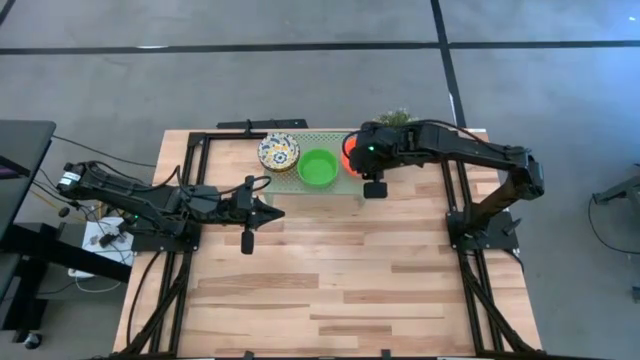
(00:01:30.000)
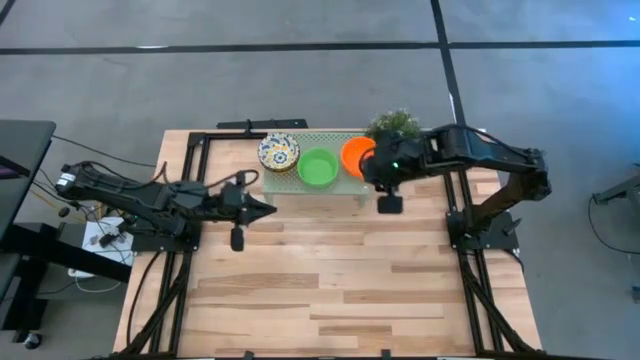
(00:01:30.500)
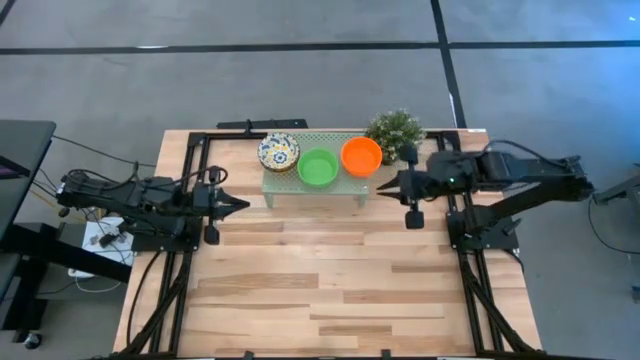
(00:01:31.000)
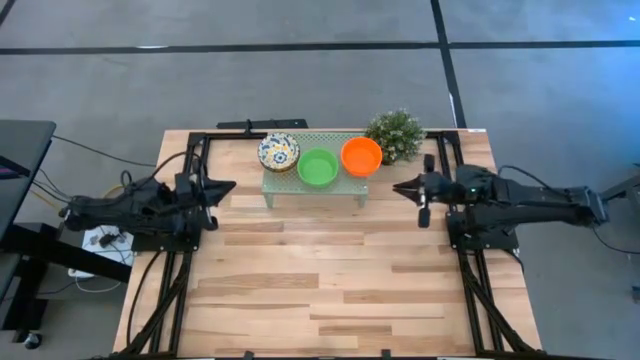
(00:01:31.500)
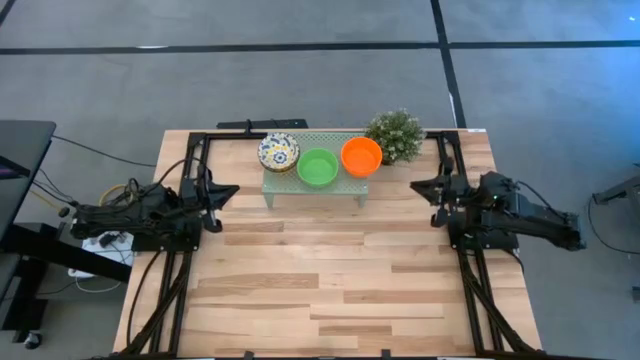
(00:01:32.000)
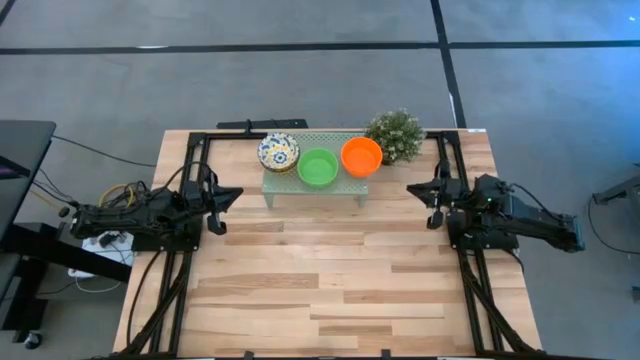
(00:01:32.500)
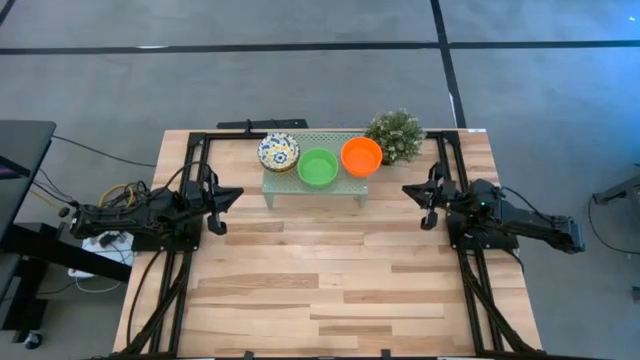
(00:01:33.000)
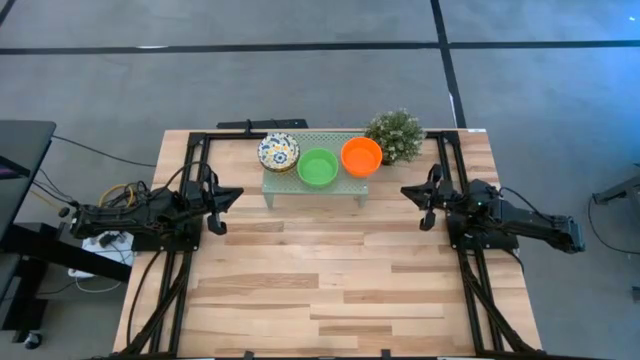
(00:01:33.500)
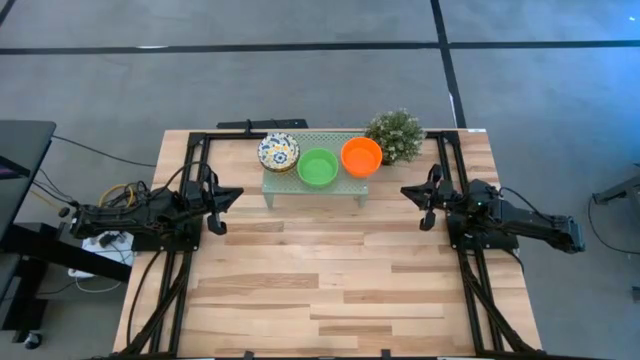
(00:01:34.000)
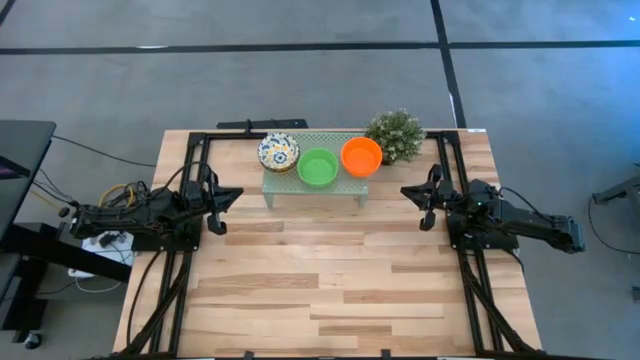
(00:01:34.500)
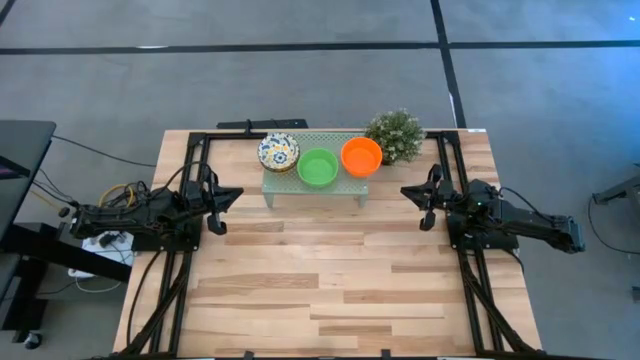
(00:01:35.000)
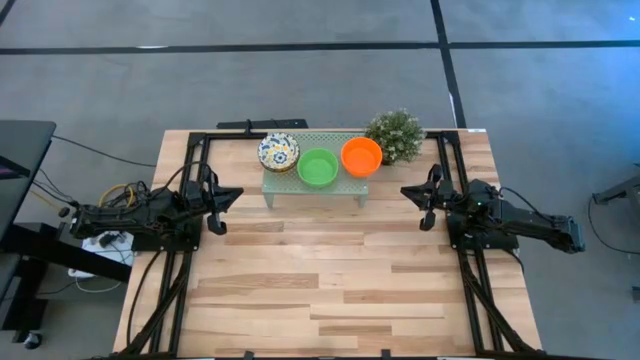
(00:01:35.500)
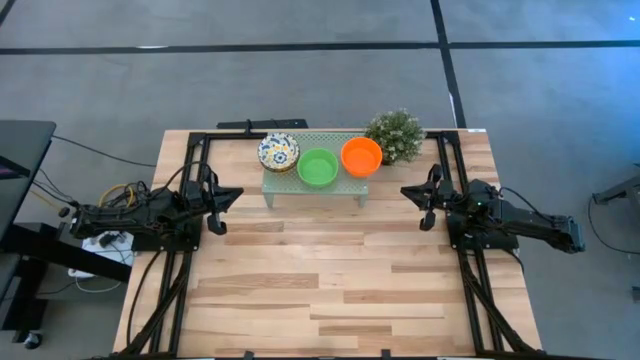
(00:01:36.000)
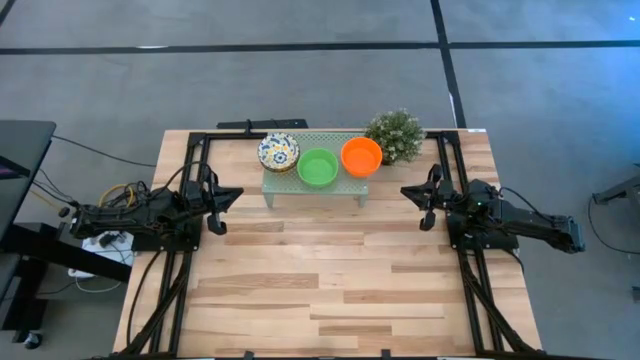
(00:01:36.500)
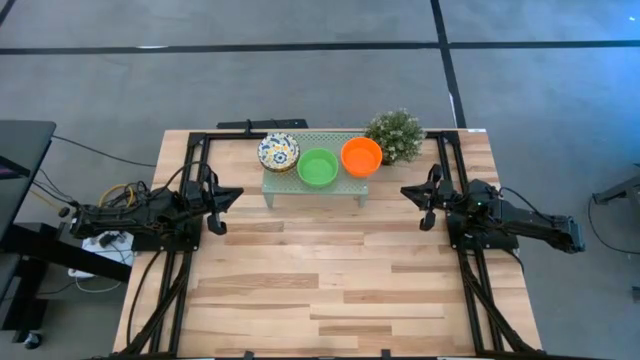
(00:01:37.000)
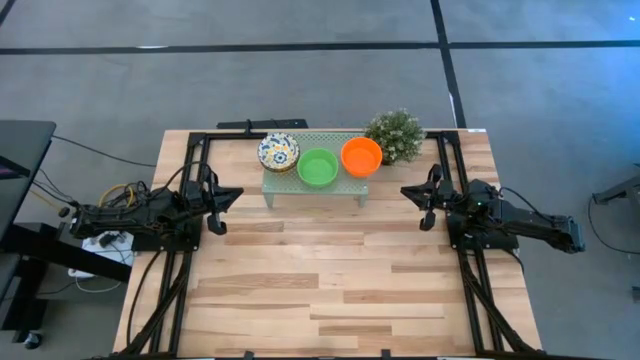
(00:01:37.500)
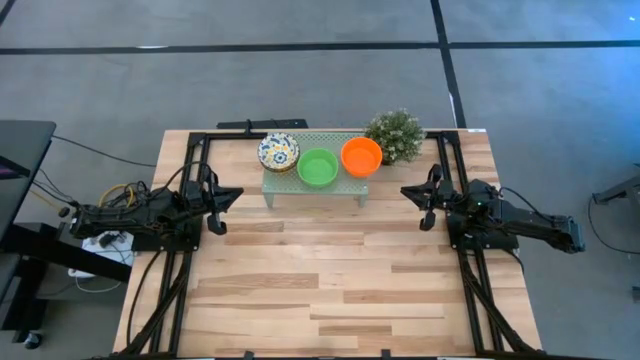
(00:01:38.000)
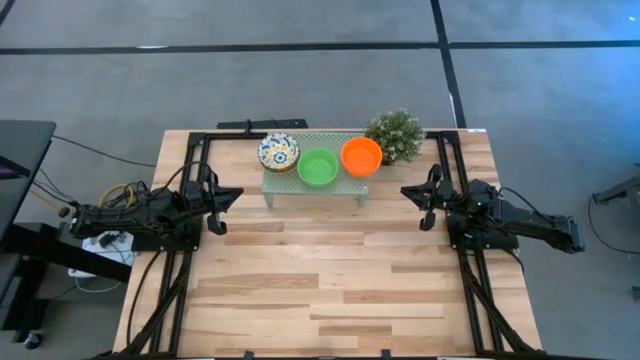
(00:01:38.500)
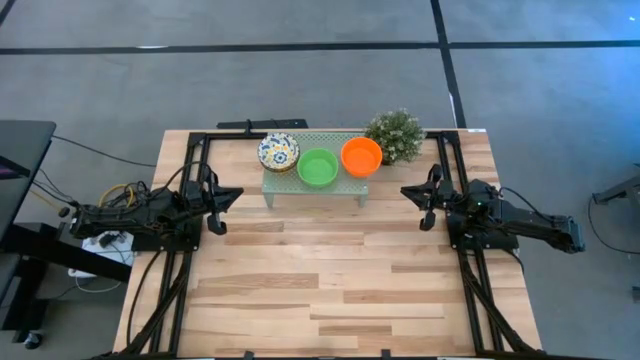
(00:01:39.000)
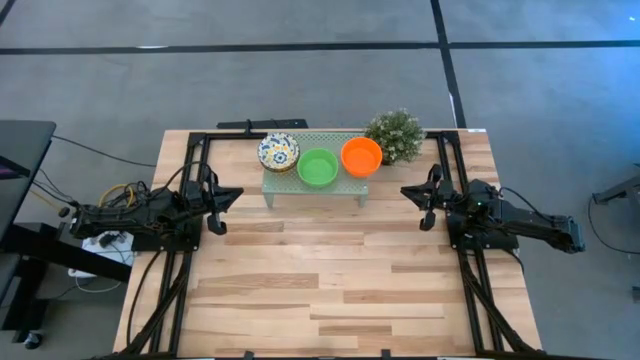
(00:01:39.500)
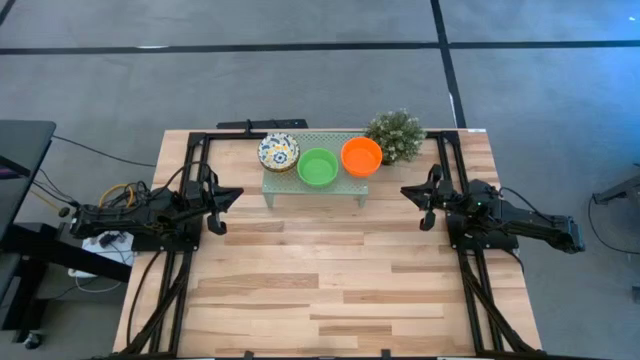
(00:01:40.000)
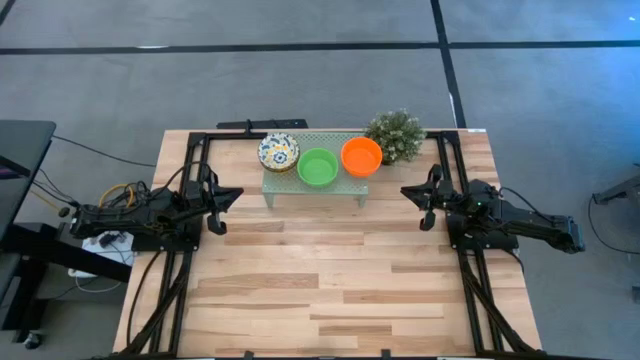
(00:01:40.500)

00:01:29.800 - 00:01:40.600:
Task: Pick & Place Mini bowls
Return to Home Position

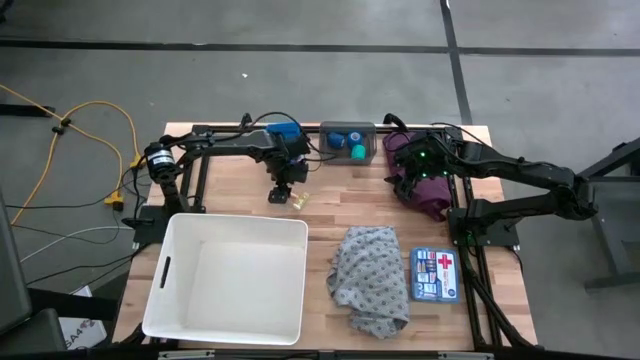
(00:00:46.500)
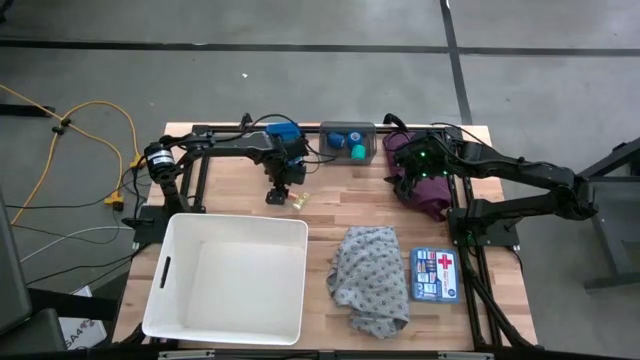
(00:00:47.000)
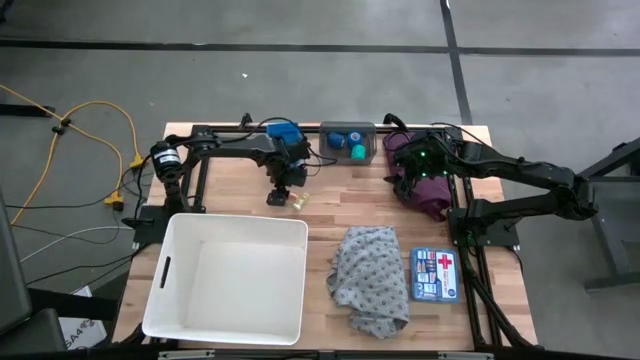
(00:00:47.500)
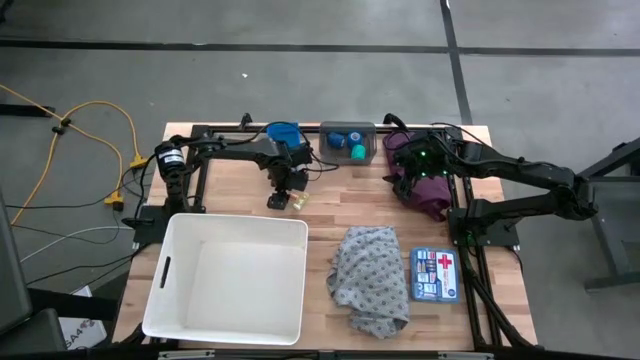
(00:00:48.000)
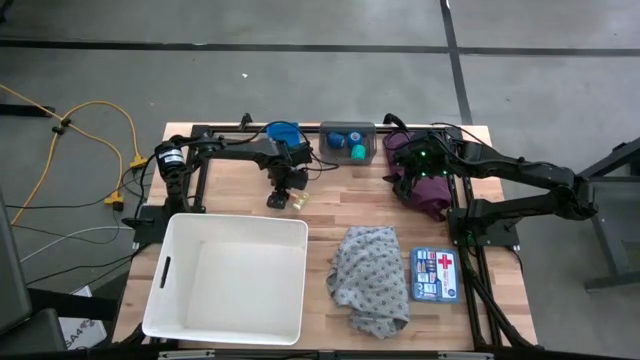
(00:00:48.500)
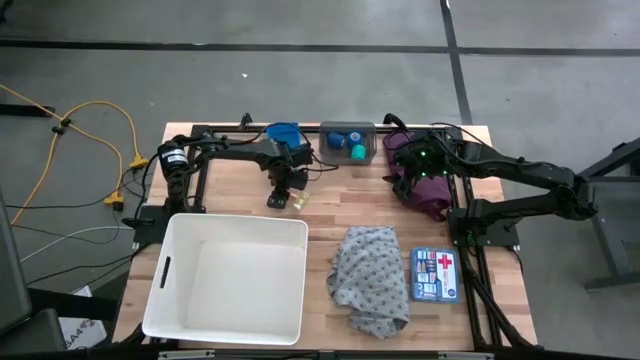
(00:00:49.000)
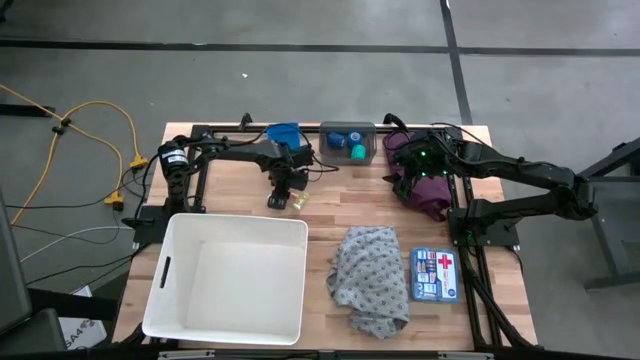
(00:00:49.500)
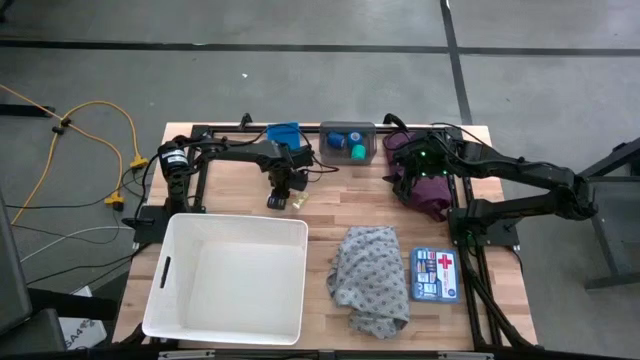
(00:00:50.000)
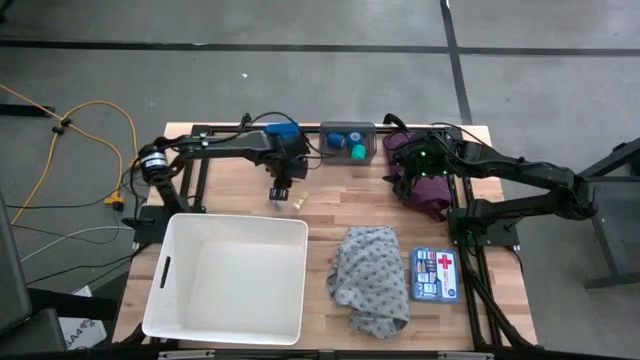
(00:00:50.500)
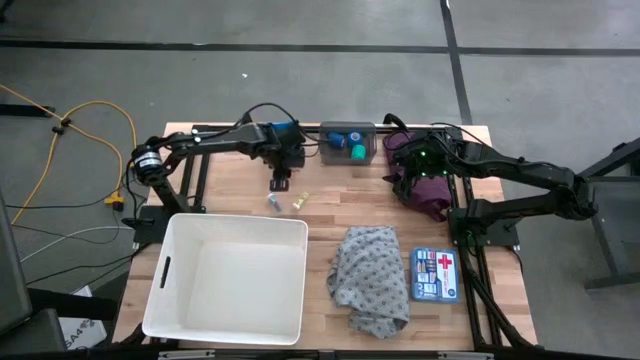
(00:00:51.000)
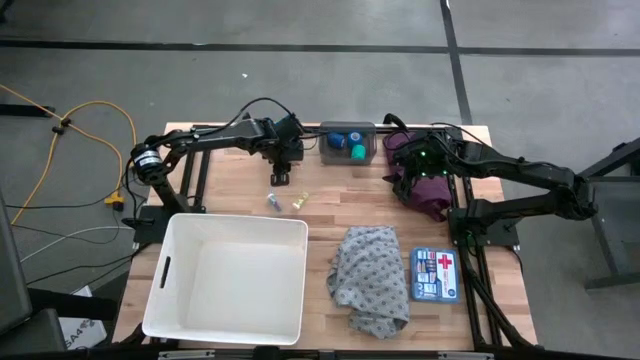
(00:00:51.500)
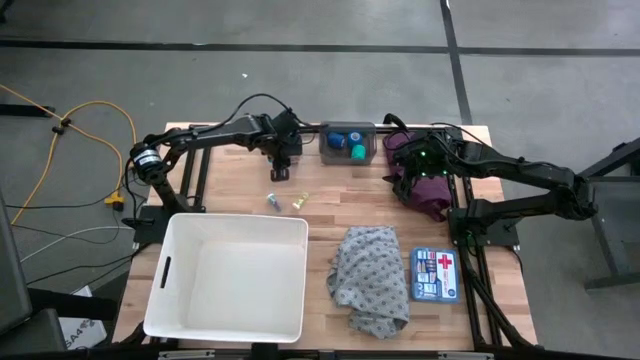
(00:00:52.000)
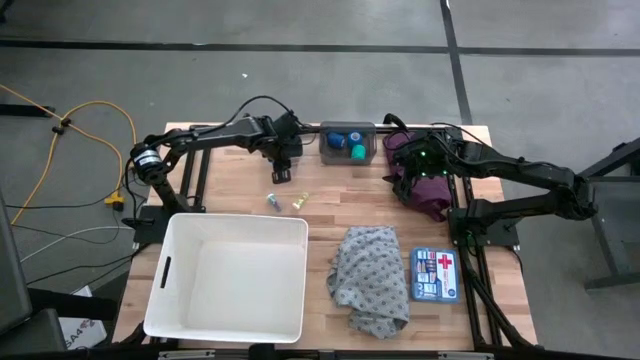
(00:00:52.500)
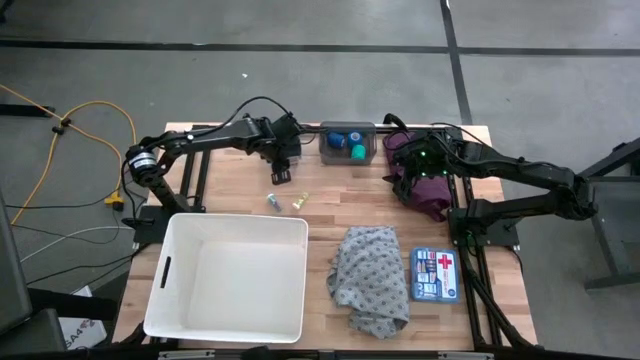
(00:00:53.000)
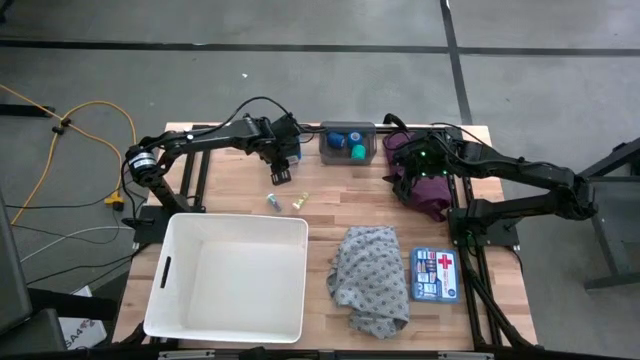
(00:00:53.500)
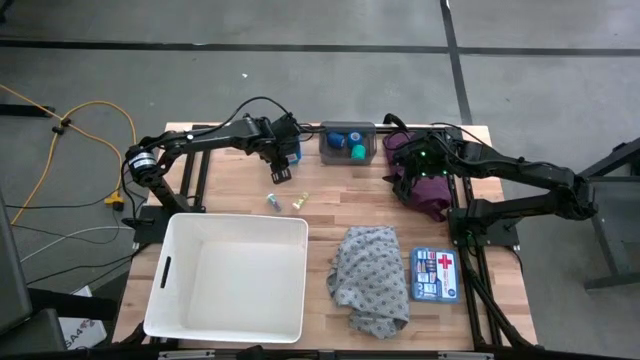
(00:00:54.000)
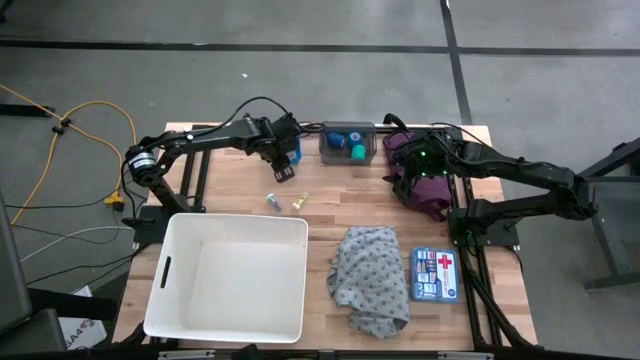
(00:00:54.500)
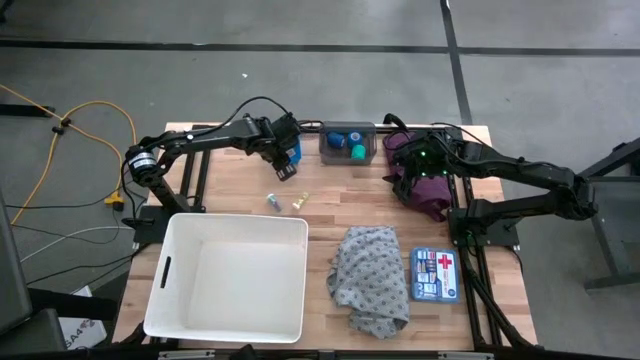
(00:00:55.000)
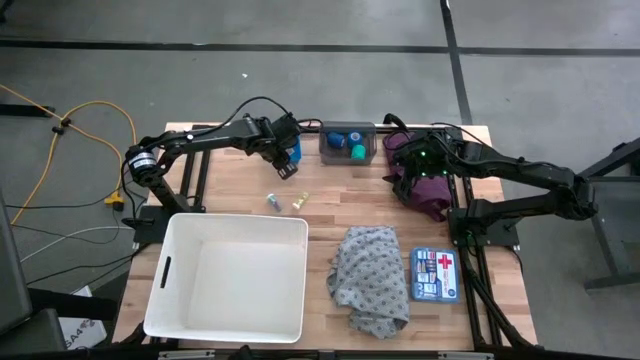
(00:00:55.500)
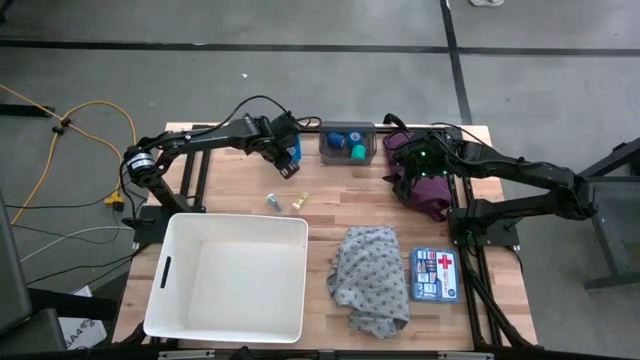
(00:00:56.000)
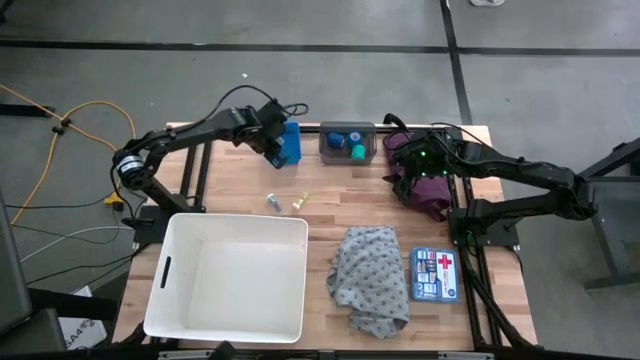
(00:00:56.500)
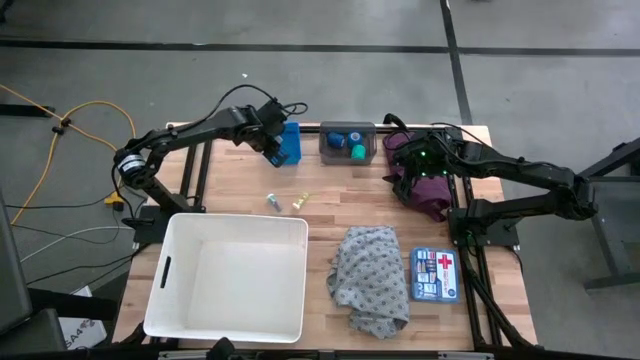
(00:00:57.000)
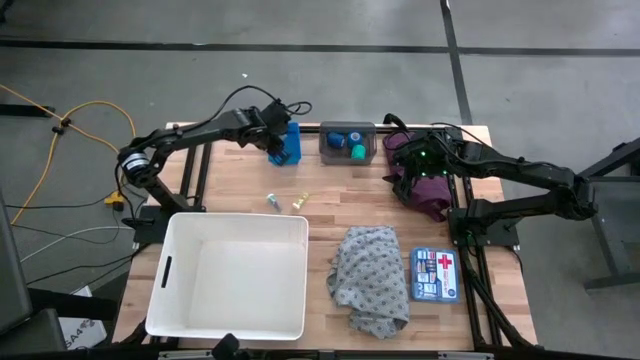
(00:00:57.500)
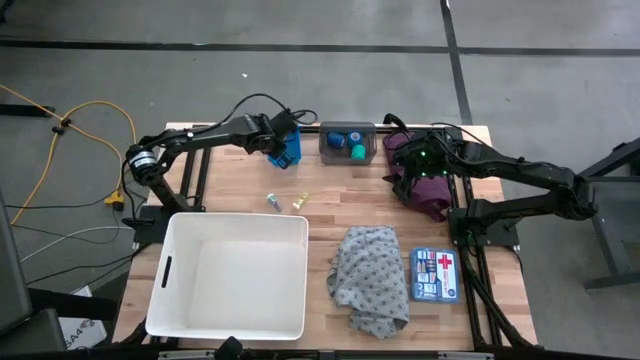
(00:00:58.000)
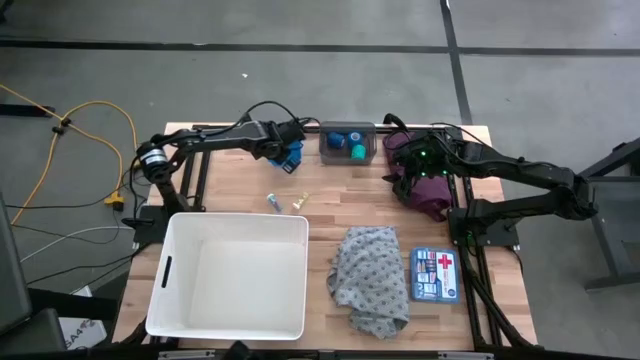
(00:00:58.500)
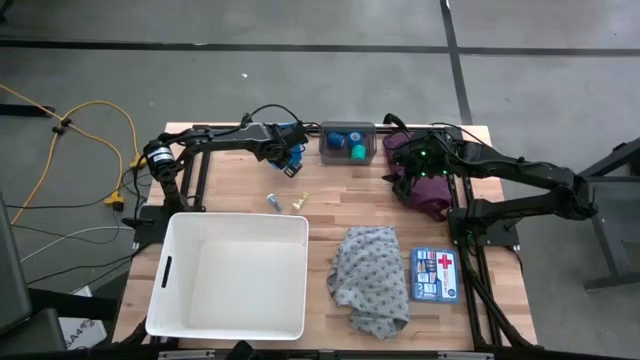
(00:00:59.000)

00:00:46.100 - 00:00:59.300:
Task: Pick & place medical supplies in basket/bin
Put the left yellow pill bottle into the blue basket
